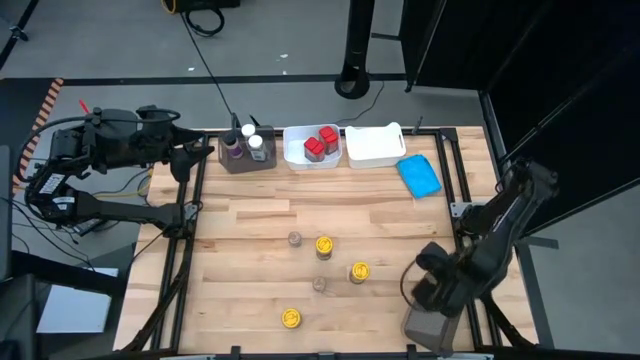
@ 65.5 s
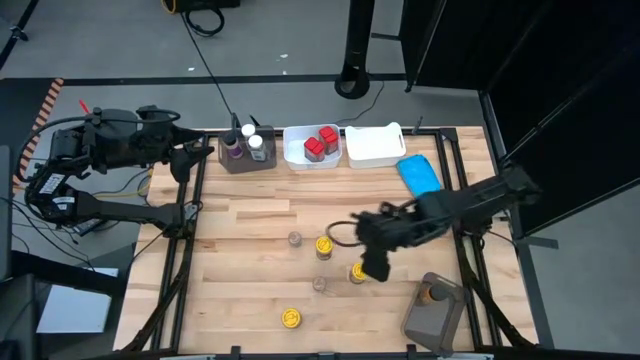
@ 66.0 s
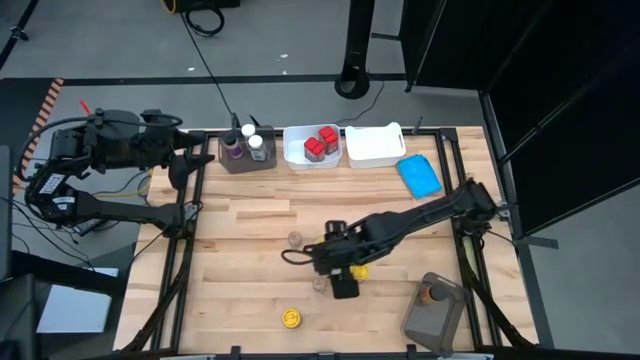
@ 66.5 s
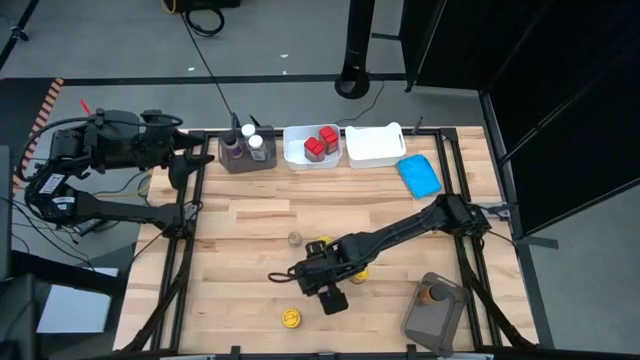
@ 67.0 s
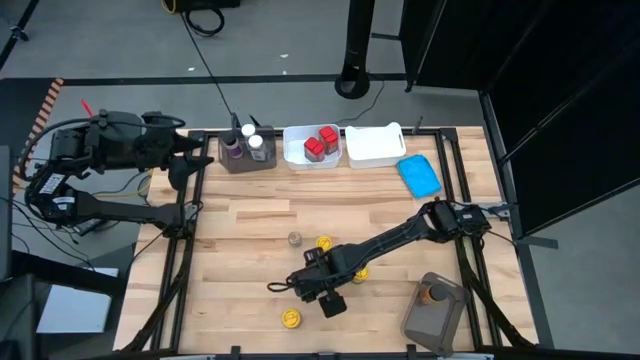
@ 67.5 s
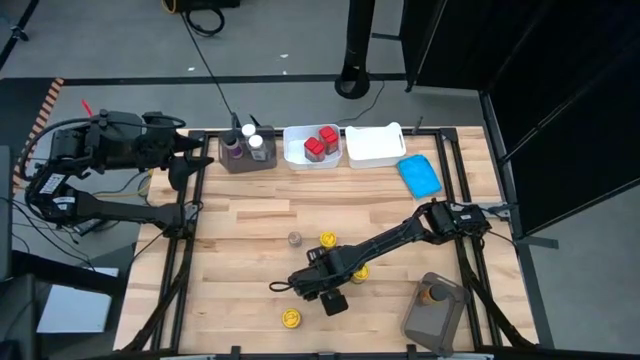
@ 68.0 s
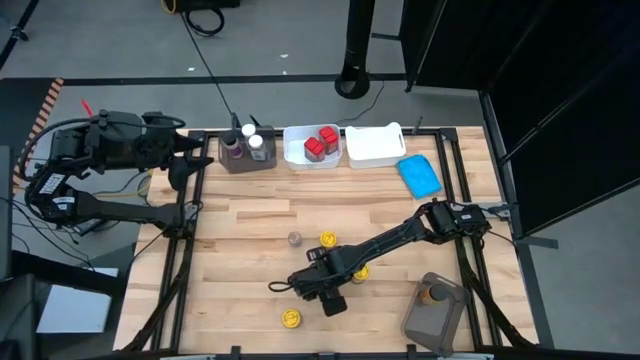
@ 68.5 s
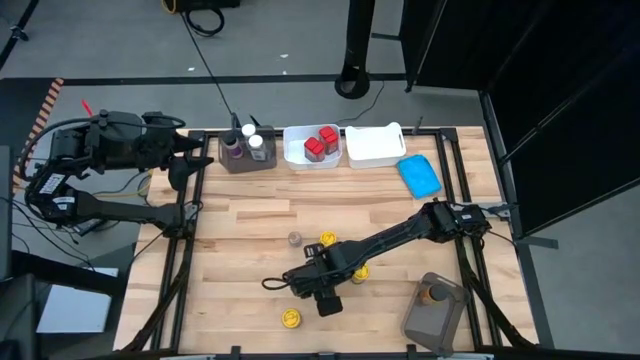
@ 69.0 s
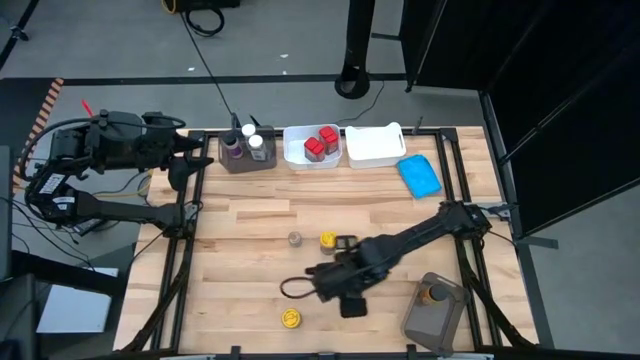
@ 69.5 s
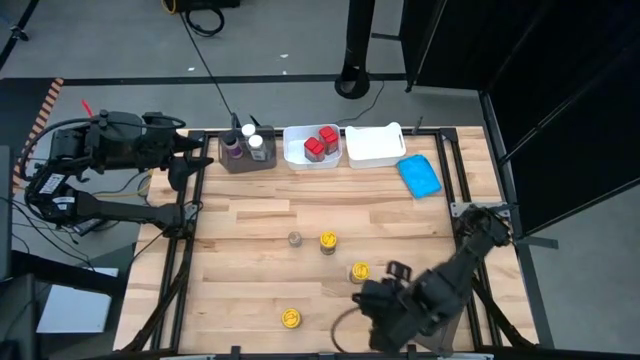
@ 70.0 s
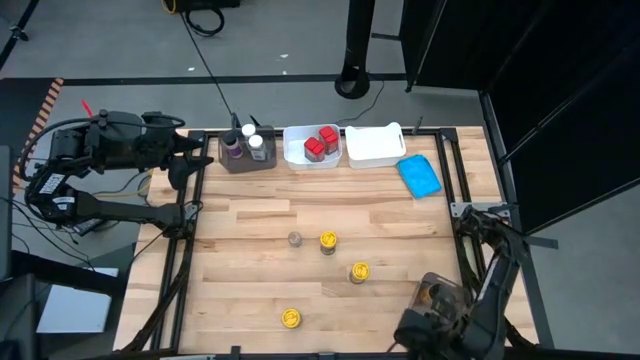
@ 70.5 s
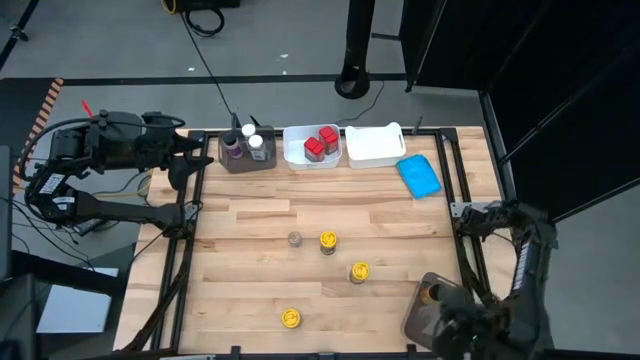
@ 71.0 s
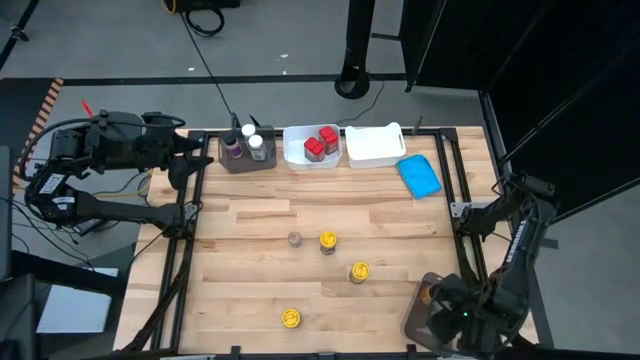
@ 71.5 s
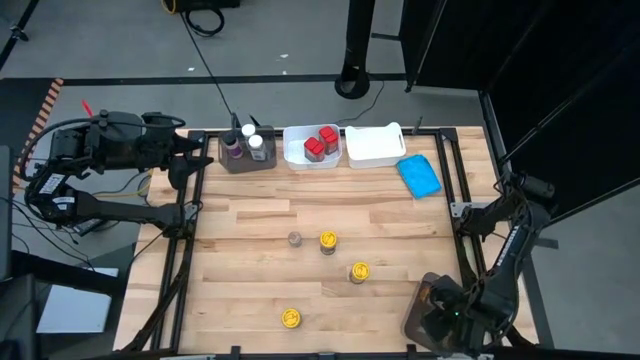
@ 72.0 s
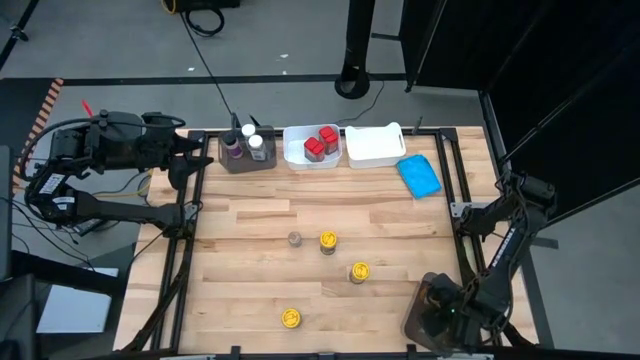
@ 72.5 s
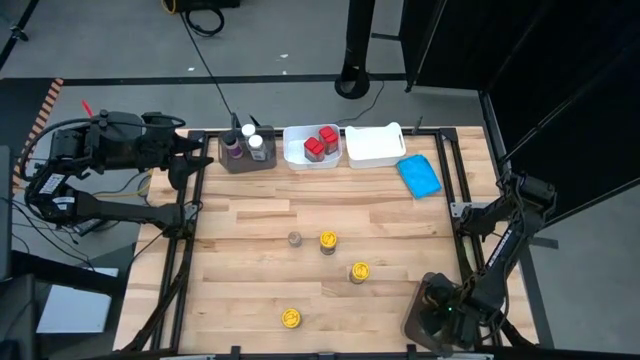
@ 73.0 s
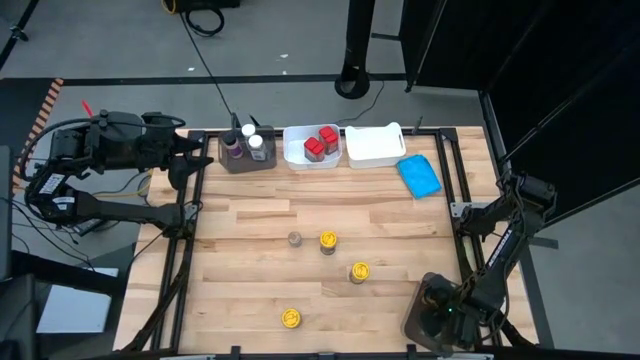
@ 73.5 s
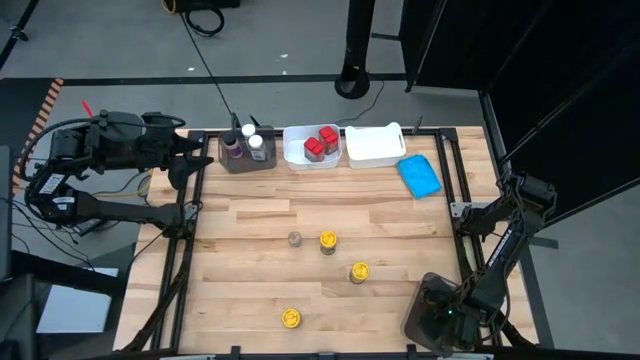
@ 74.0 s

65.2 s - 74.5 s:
Task: Sort spices by type
Put the bottom brown seasoning bottle into the bottom black bin

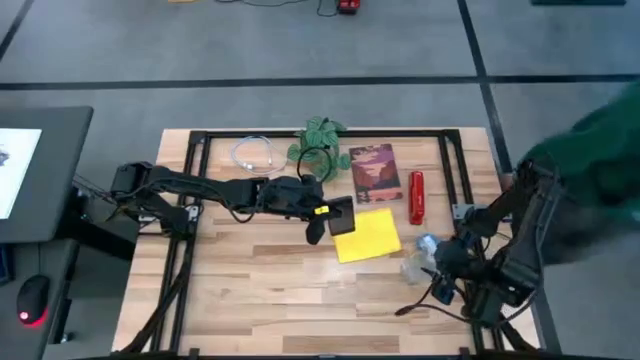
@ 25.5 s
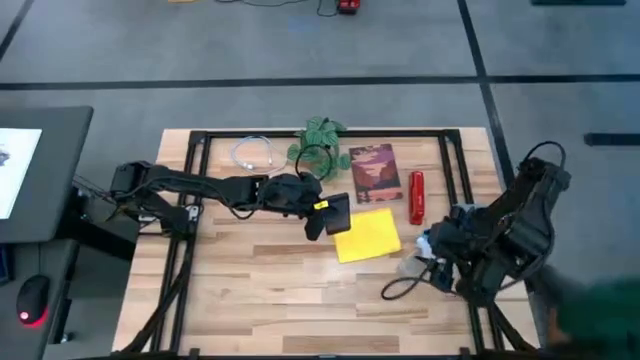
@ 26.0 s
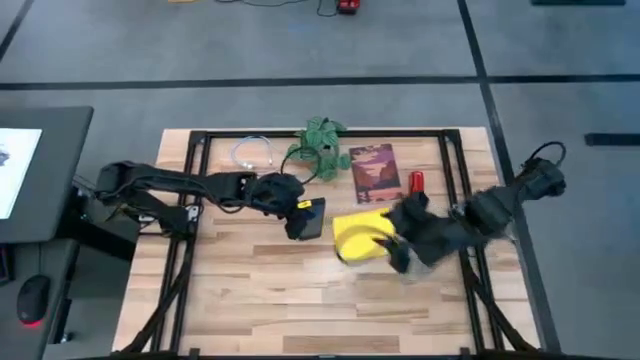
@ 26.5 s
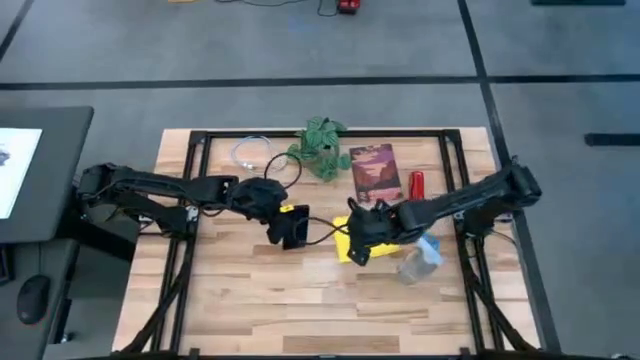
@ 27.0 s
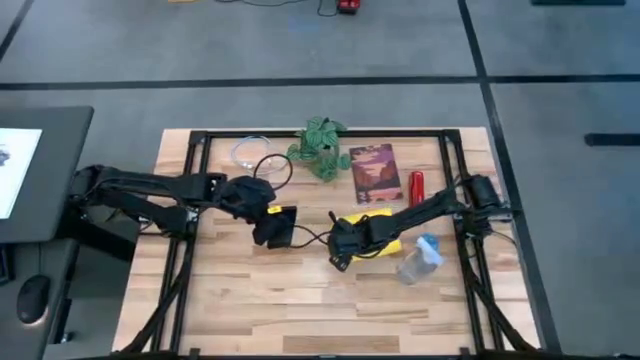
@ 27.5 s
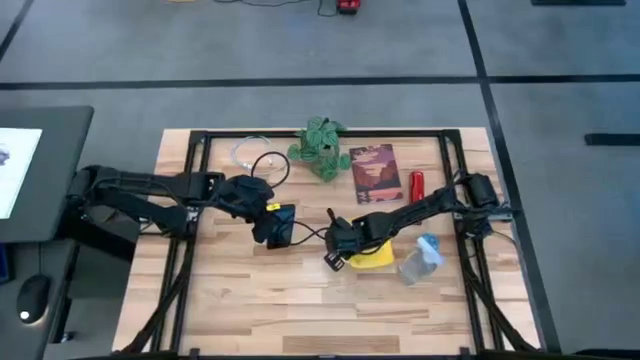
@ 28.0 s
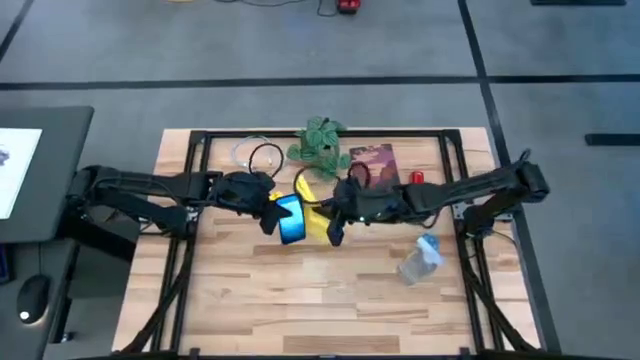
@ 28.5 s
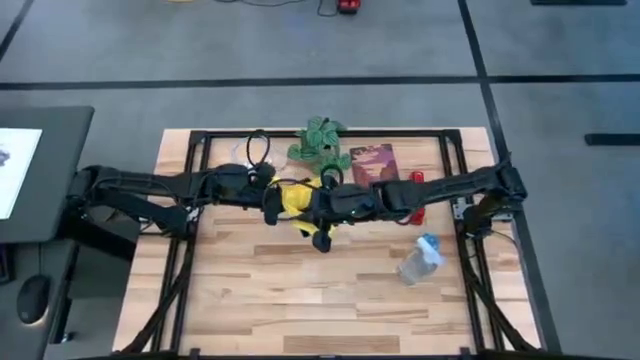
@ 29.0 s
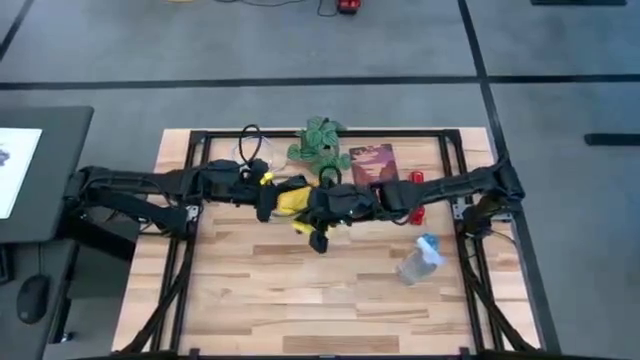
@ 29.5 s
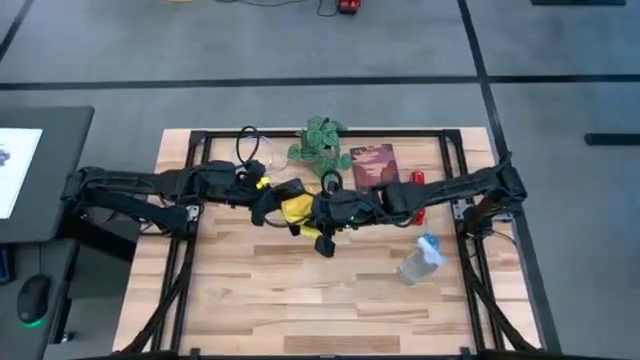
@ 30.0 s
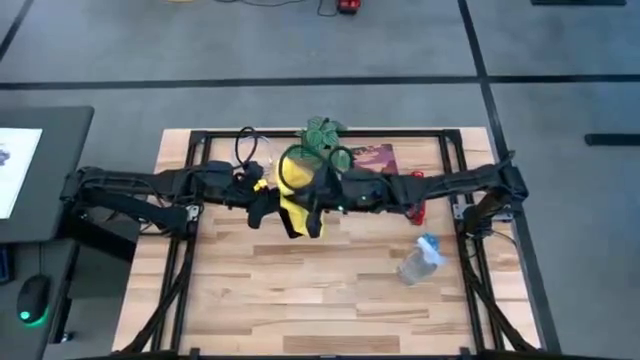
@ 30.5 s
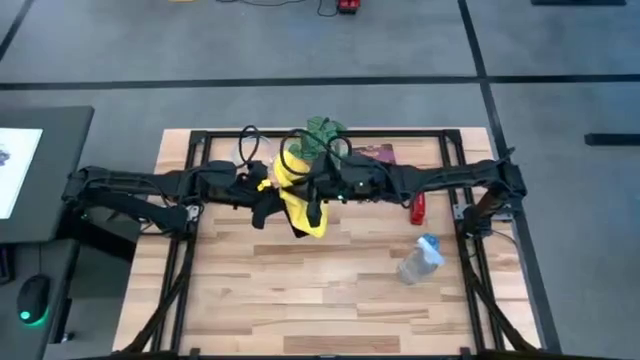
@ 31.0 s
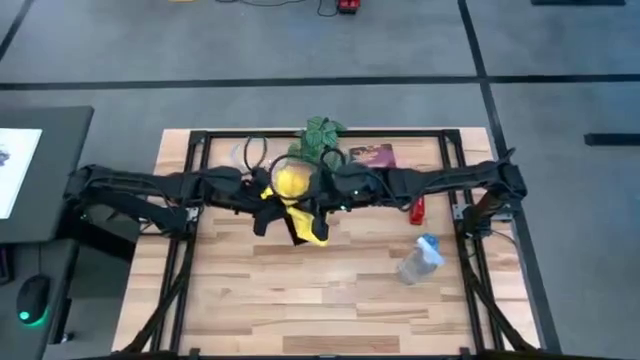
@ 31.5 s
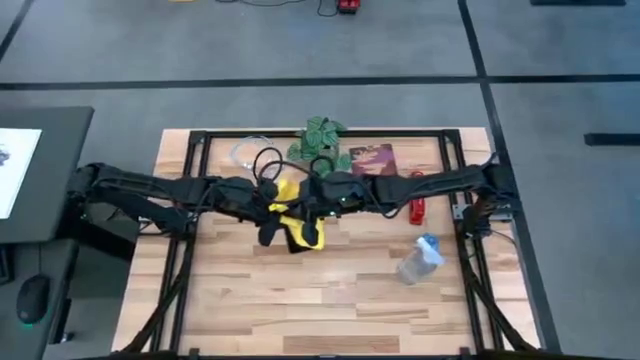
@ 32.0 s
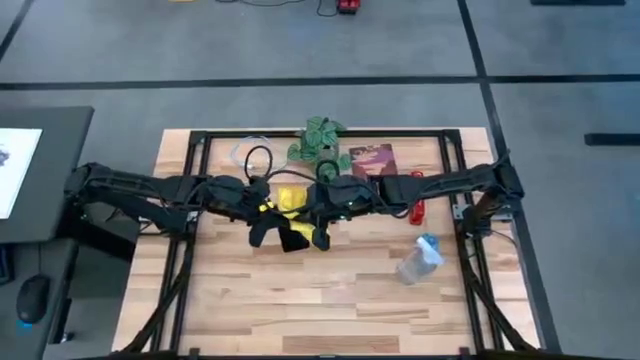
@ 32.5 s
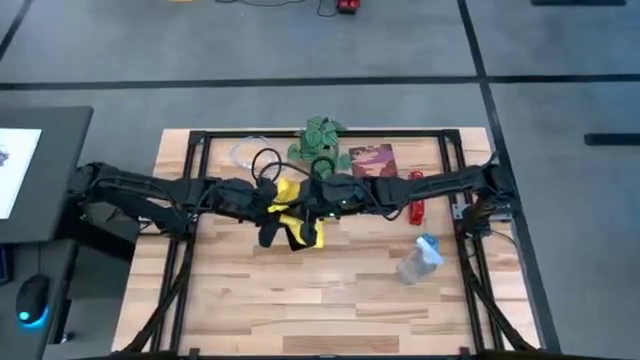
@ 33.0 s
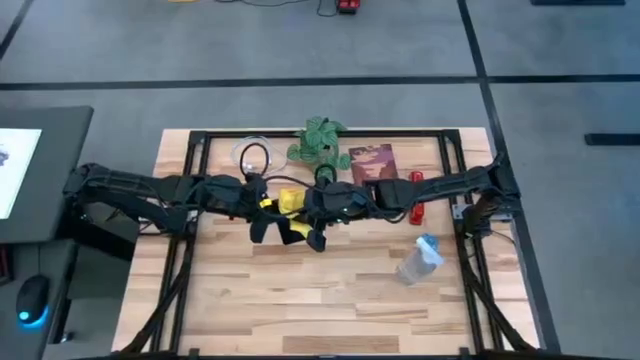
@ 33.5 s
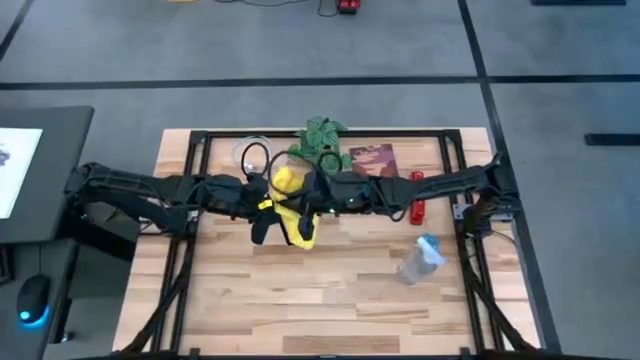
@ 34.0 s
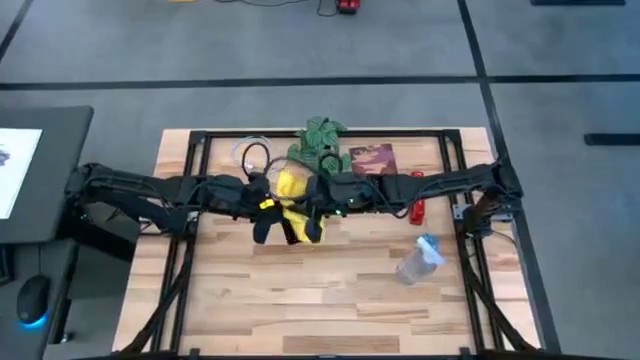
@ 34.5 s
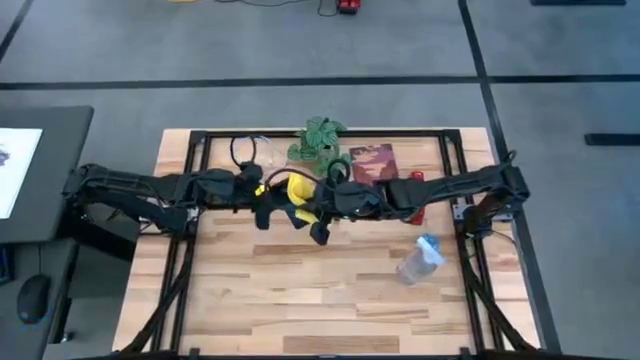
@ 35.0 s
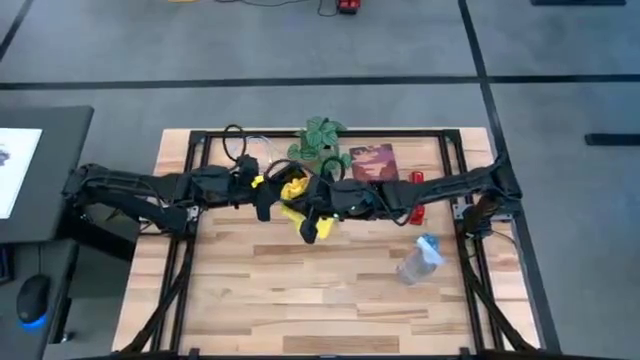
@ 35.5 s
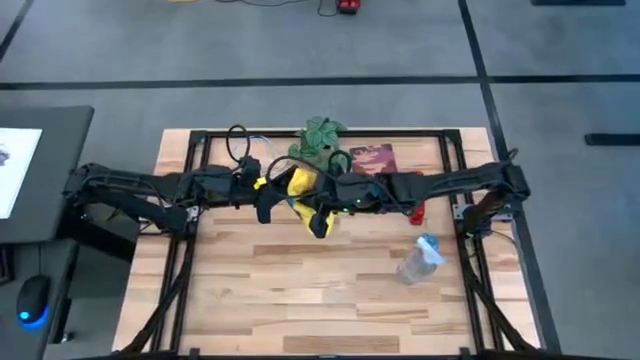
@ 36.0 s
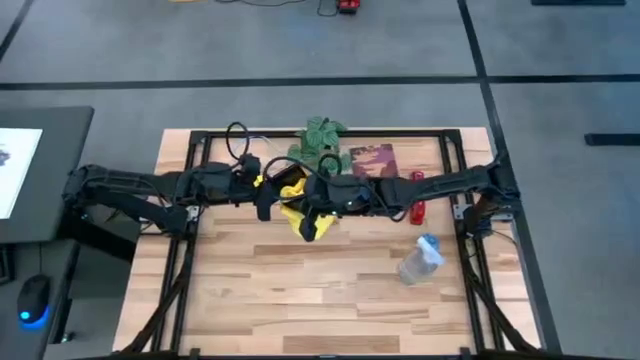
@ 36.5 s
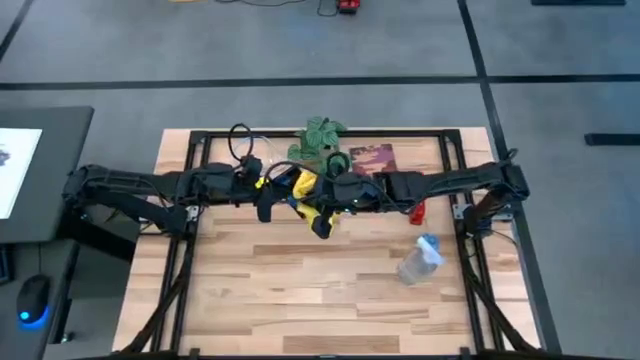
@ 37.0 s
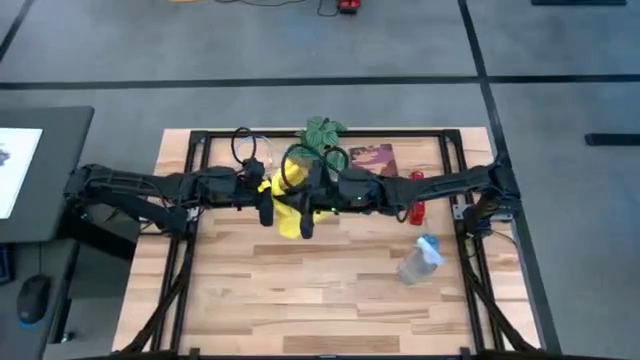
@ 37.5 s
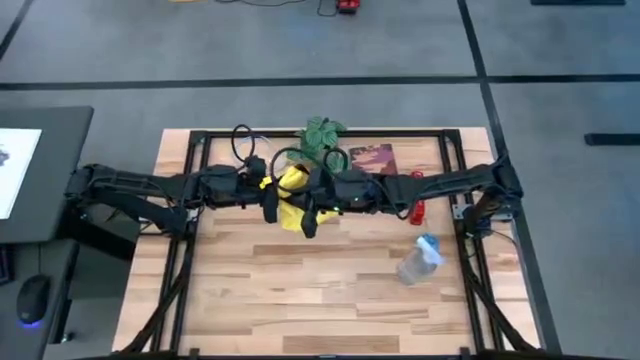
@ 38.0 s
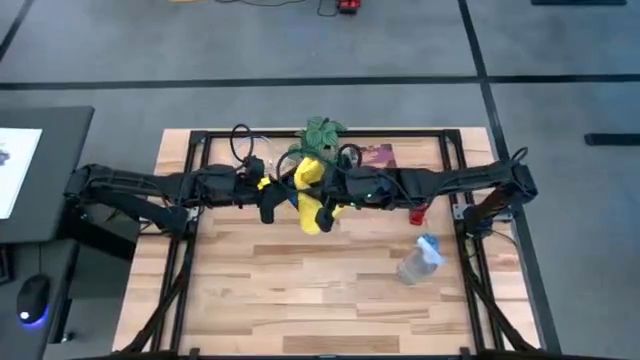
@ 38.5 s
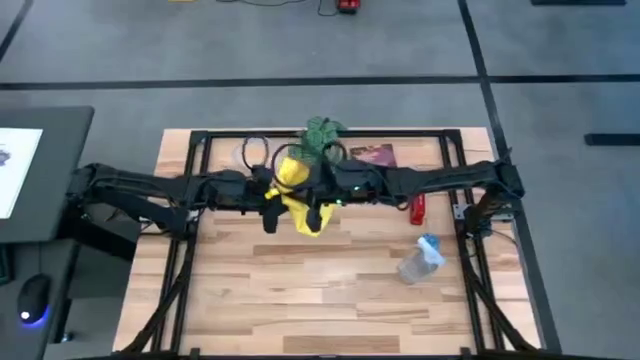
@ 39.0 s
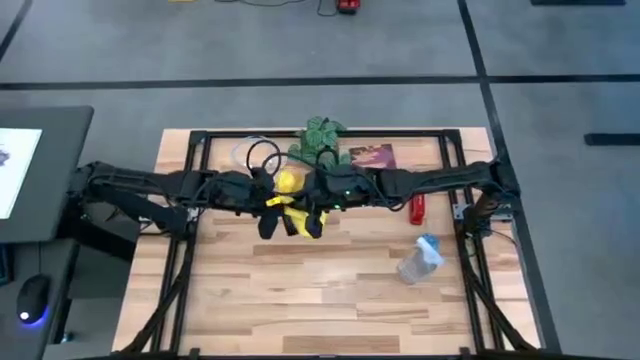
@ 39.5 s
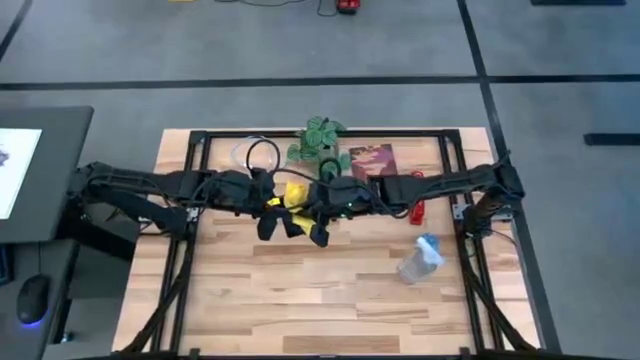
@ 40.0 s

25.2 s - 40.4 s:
Task: Apply microfiber cloth
Wipe the front of the cellphone with the yellow microfiber cloth
